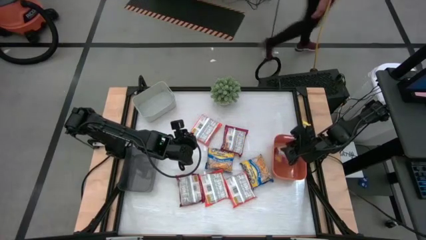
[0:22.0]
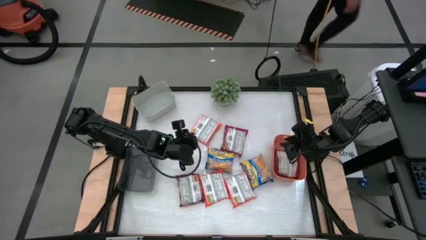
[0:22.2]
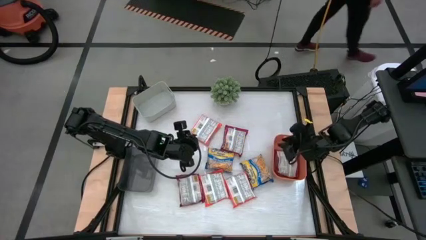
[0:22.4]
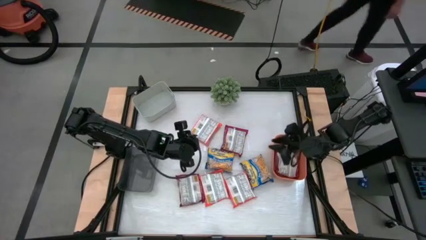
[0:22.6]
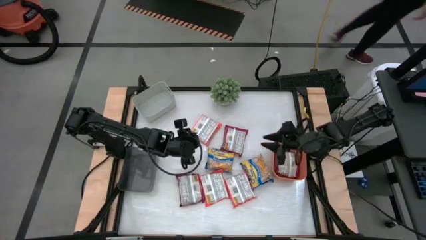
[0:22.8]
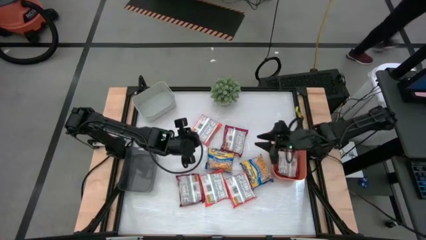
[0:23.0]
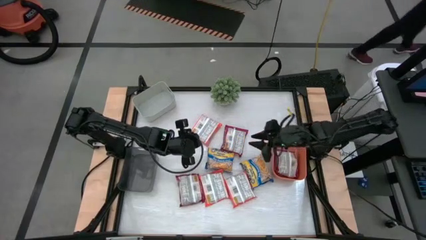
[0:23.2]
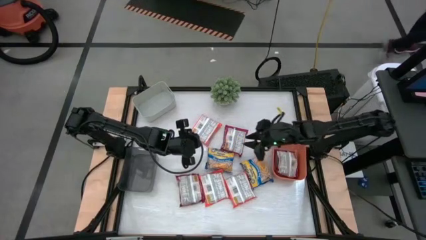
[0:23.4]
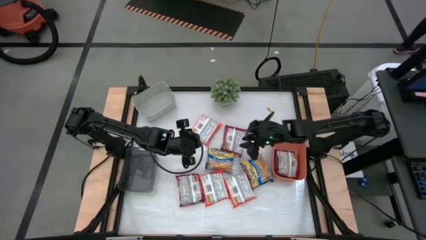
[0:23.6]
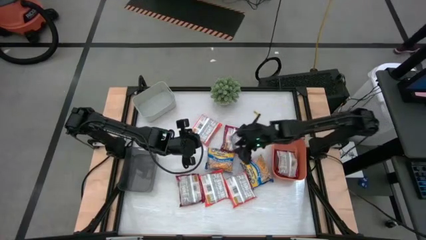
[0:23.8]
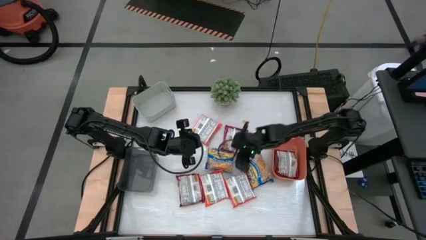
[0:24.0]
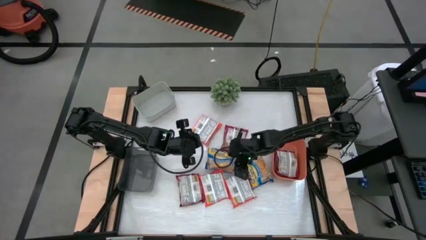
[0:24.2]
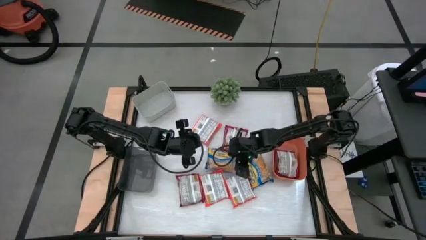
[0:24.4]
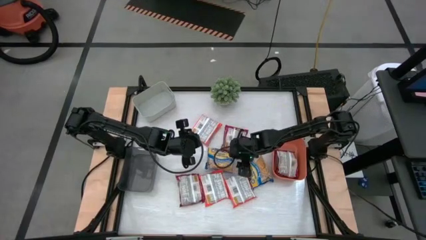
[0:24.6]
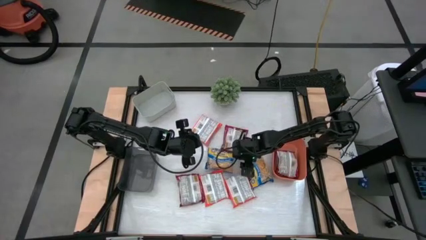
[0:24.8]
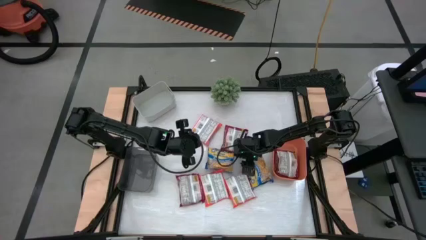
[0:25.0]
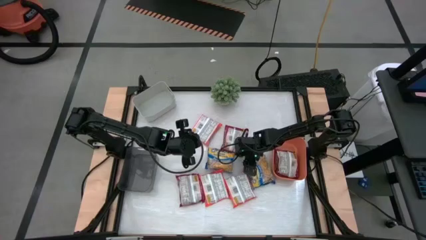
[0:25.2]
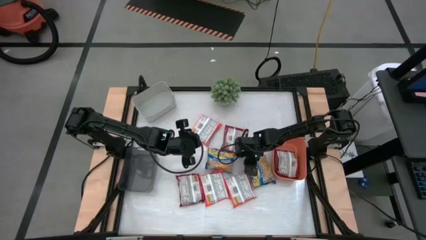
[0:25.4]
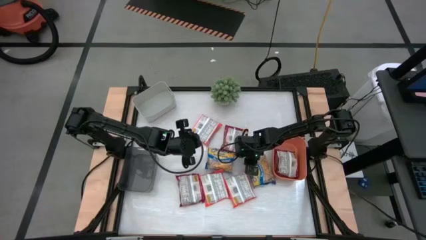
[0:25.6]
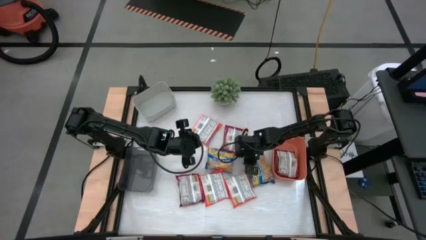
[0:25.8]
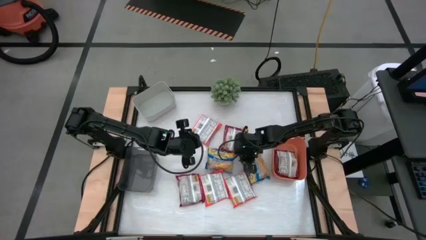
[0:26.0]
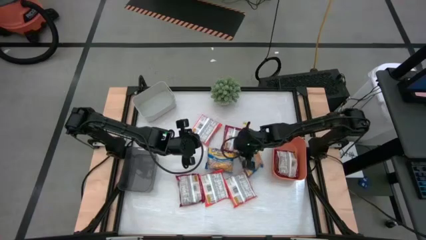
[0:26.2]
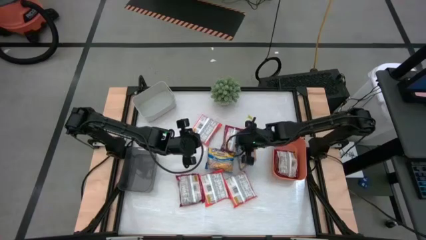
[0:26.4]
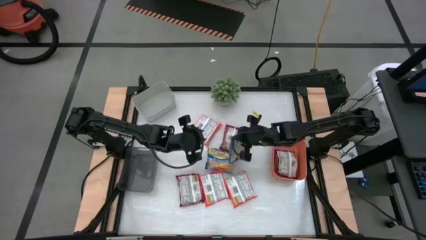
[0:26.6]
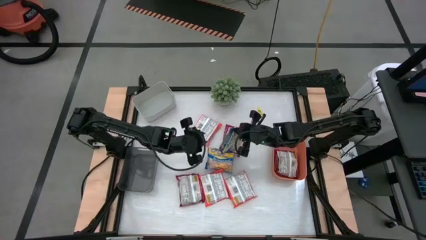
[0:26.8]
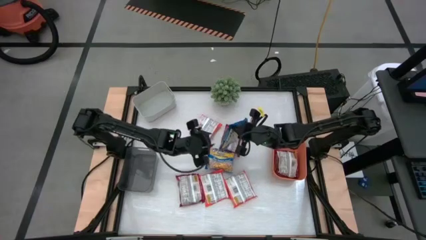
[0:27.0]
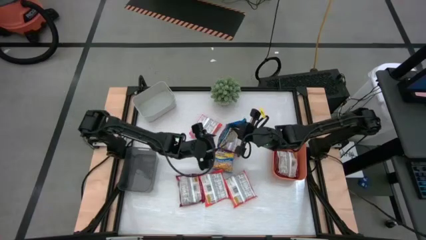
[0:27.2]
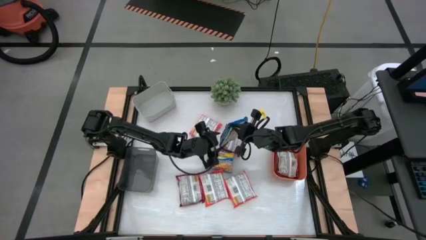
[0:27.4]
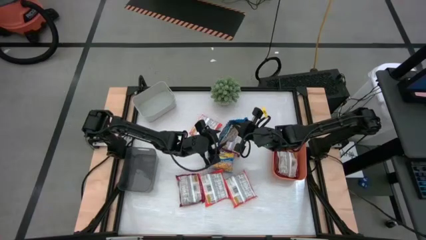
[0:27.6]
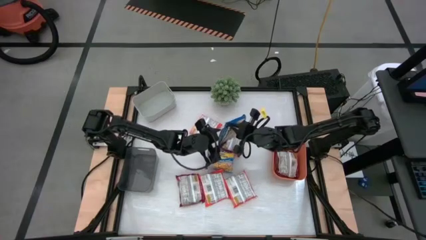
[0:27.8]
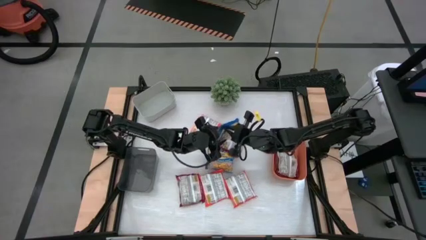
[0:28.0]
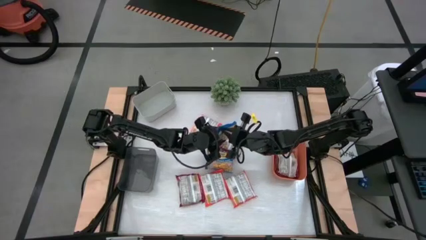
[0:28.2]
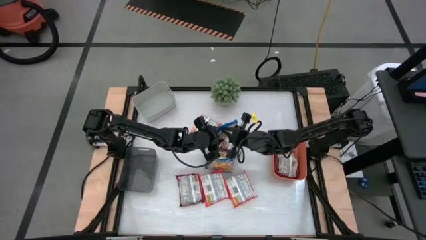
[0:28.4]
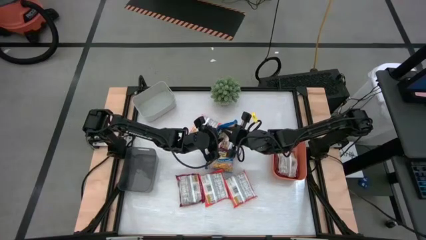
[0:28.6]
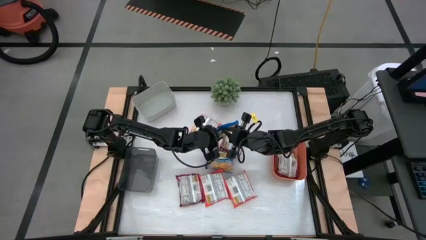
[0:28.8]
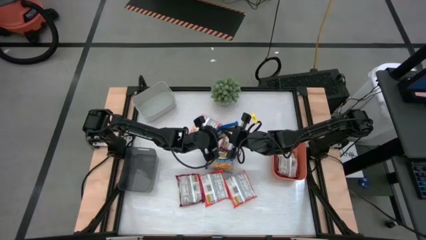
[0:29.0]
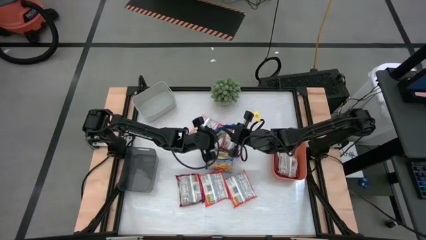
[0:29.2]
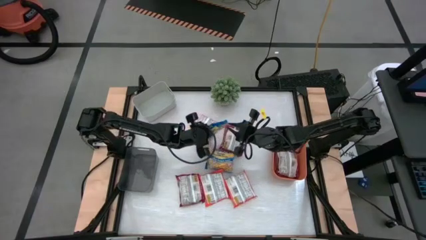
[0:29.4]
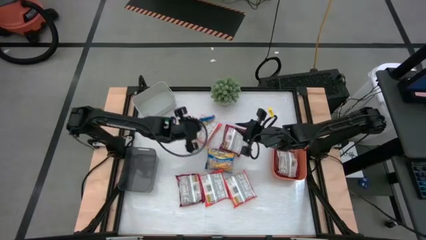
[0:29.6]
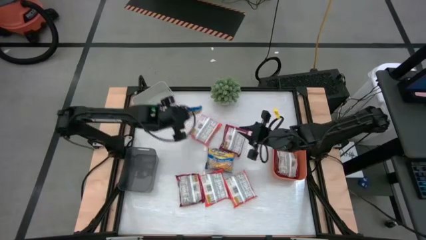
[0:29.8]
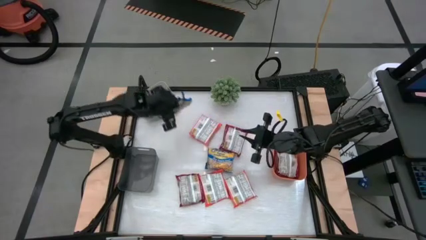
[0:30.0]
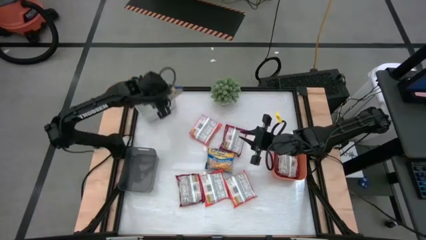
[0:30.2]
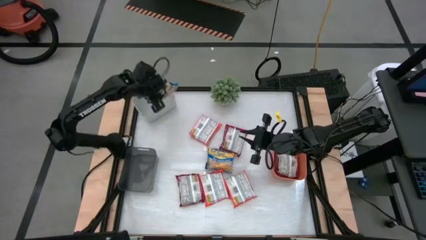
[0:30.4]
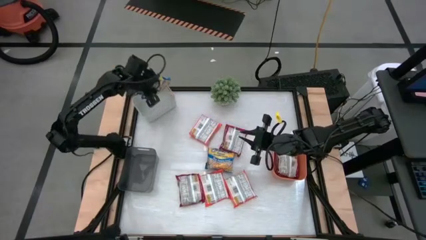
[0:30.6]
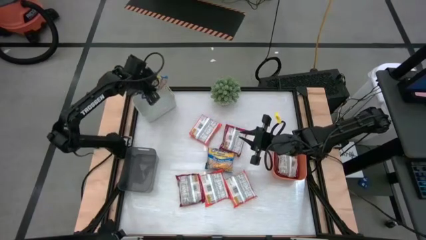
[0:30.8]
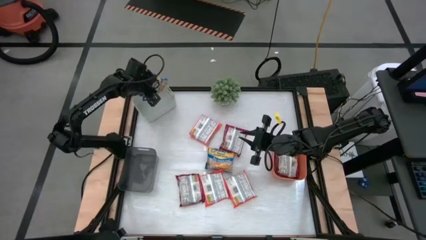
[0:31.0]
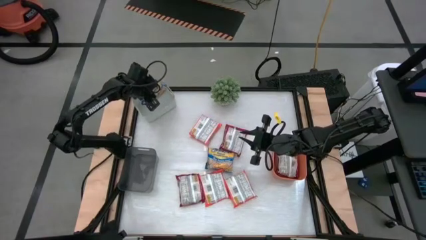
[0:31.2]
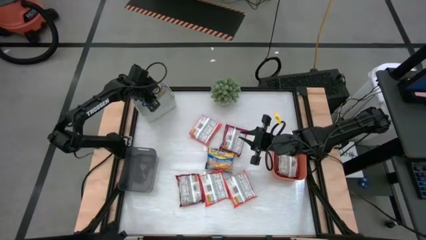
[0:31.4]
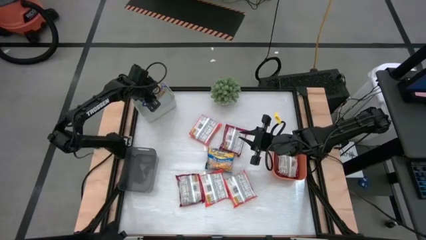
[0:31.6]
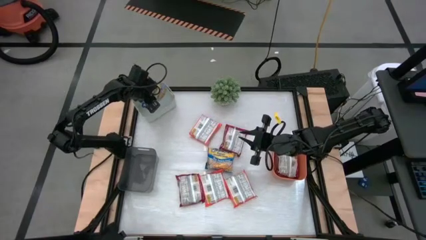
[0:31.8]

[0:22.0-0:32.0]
Task: Sort Maruchan noodles
Put the blue bag into the white bin

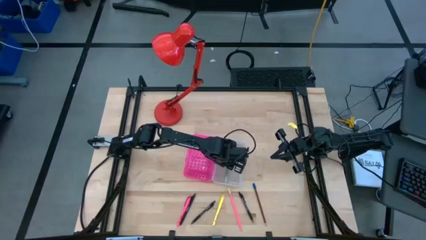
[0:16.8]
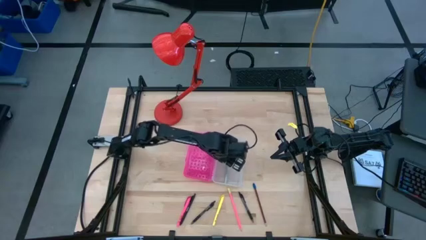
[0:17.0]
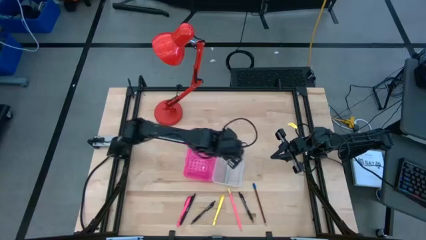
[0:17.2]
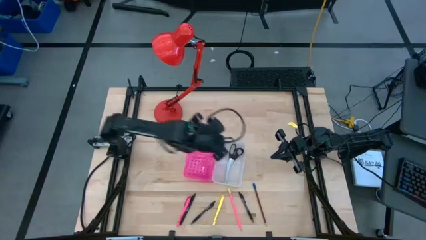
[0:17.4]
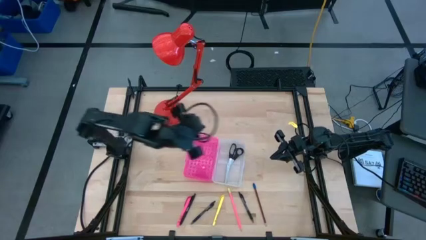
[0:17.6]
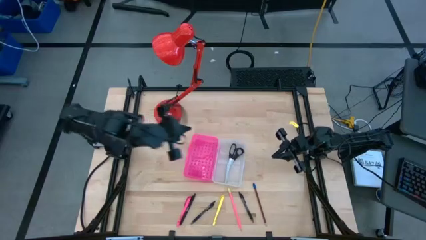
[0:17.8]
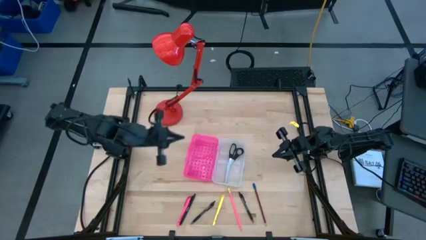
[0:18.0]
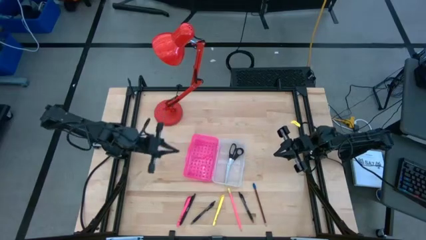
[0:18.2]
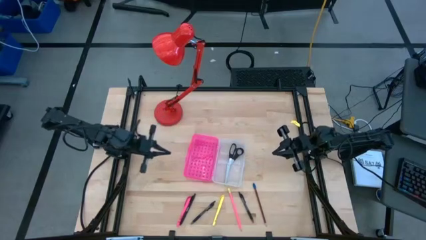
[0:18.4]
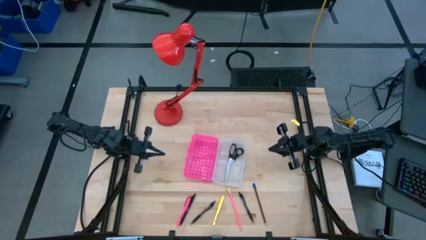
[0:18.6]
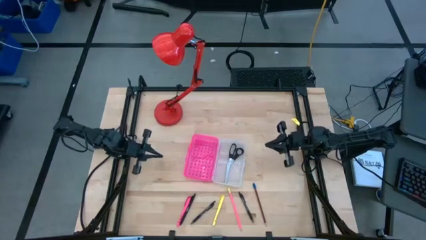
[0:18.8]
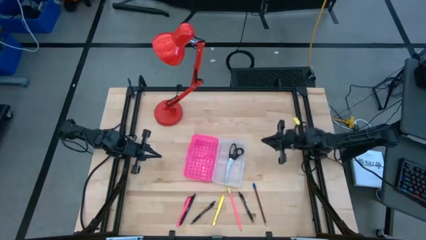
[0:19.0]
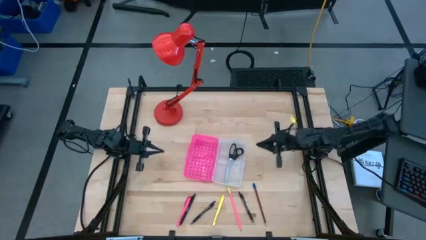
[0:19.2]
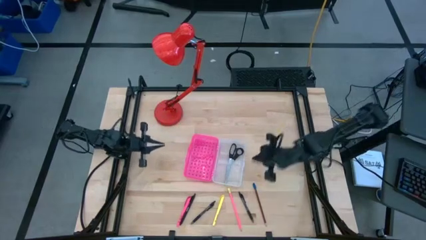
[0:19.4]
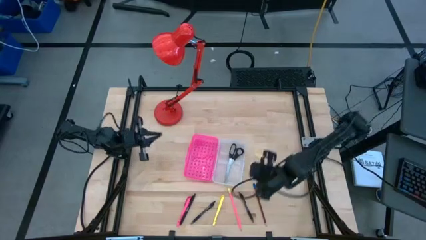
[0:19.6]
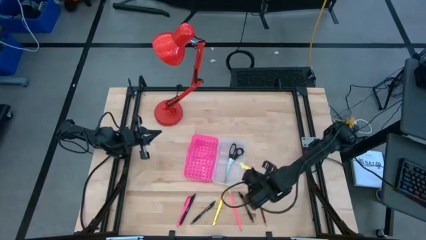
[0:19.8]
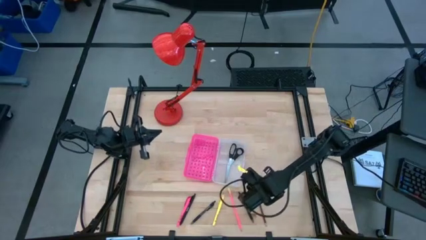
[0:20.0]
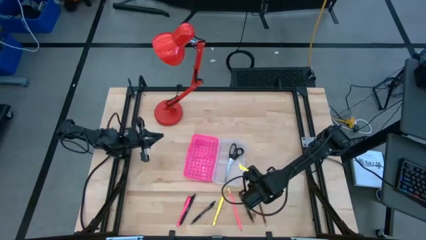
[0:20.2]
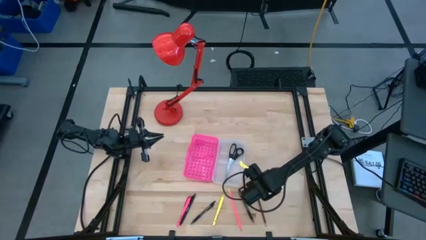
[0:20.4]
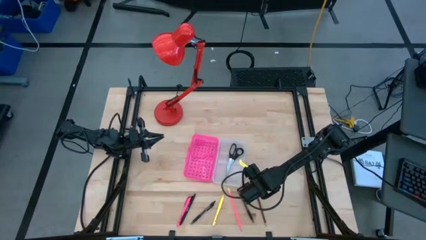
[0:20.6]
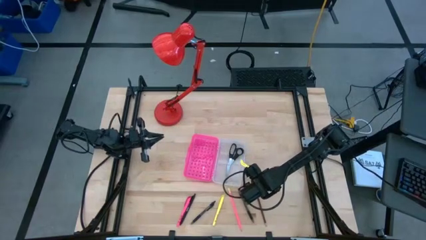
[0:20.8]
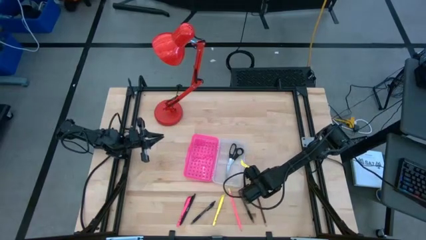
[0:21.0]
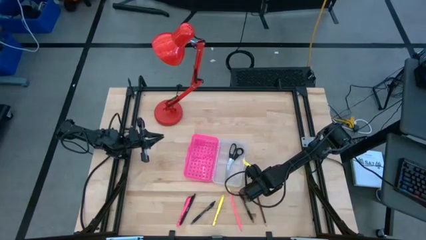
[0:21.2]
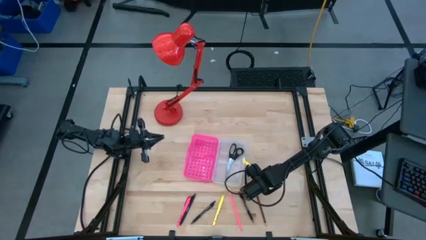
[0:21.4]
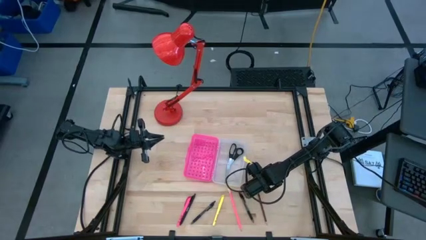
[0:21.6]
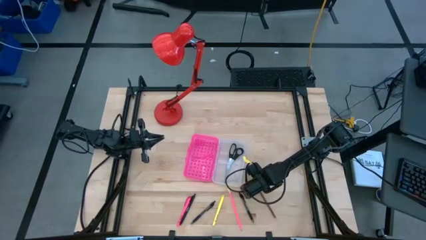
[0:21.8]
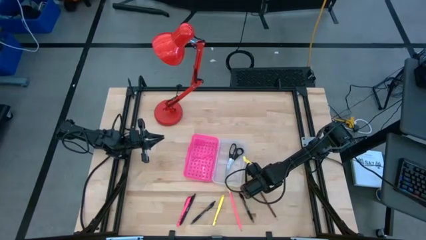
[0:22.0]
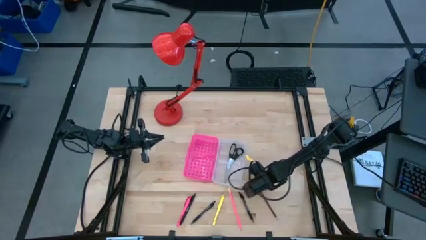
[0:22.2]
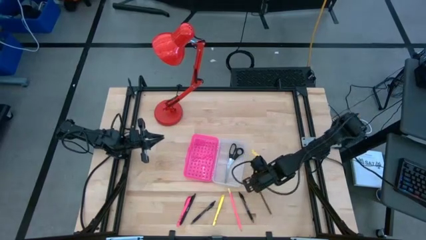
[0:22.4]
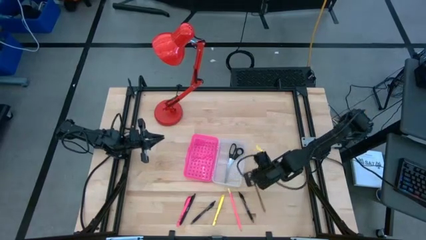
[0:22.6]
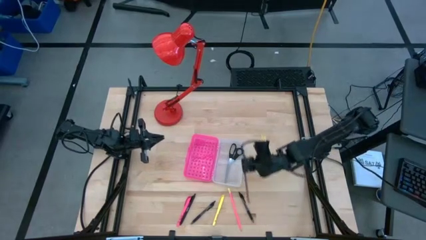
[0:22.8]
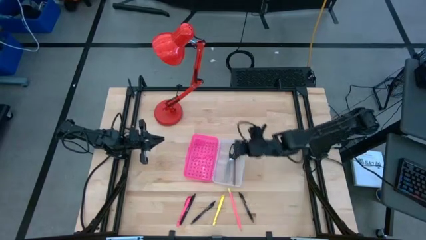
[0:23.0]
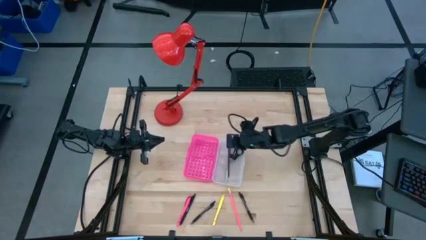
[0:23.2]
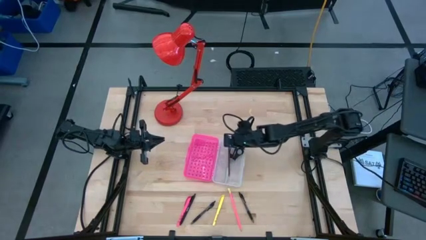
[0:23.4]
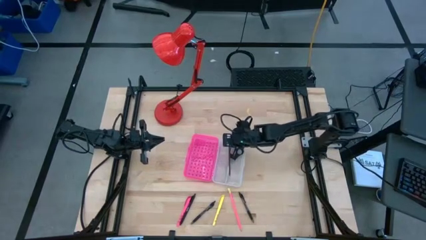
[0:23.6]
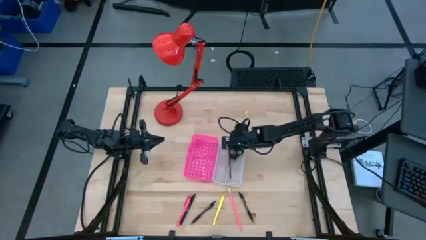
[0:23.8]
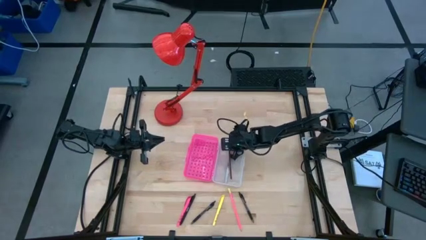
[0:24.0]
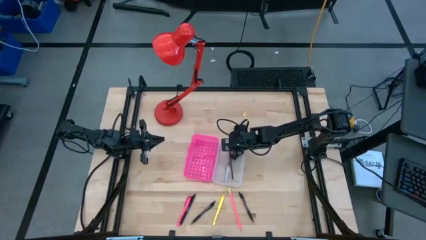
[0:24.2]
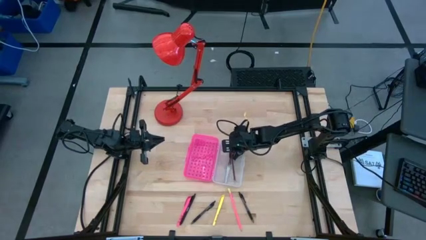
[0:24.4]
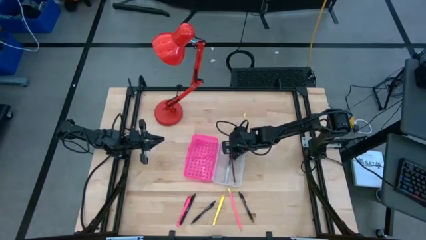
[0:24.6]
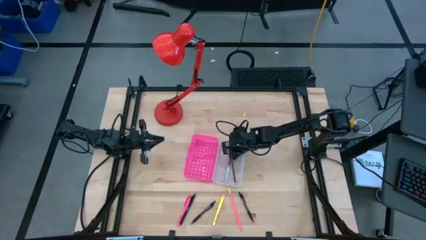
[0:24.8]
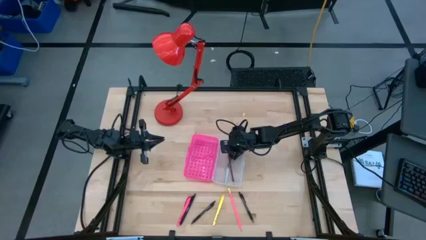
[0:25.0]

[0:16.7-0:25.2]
Task: Pick & place school supplies into a supply box
Put the brown supply in the pink box
